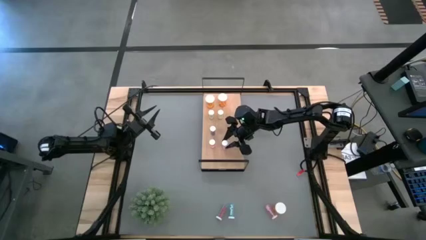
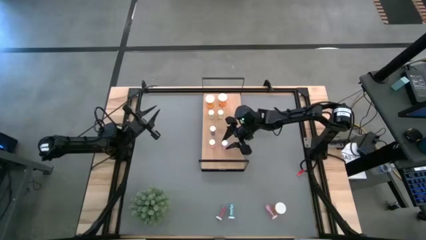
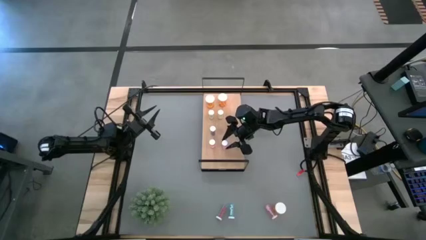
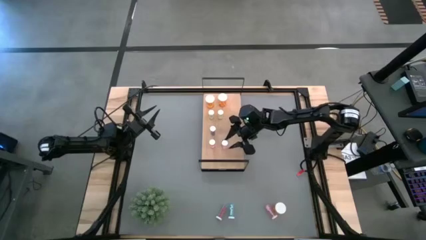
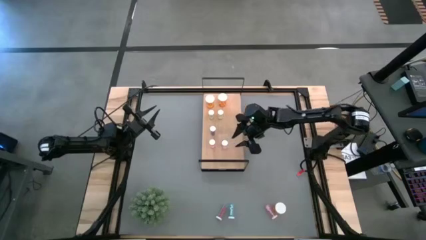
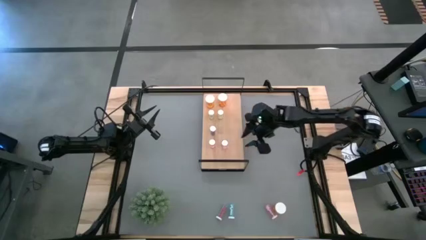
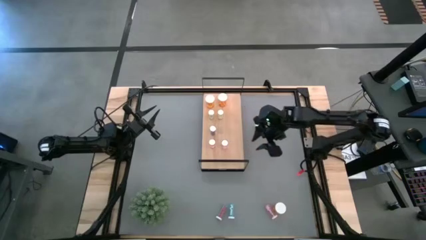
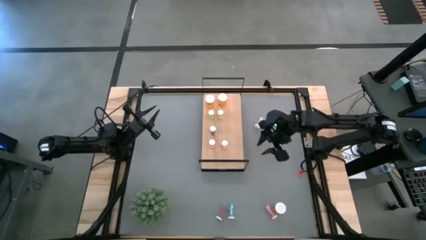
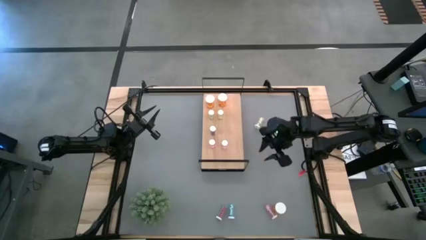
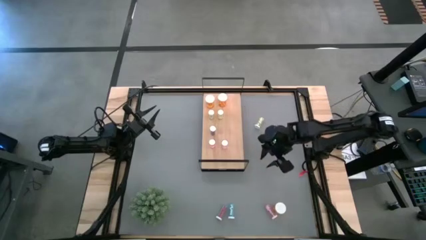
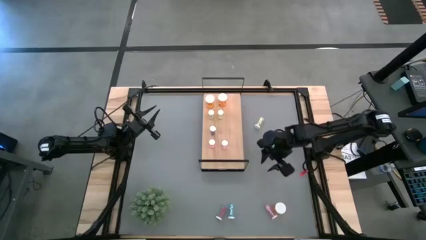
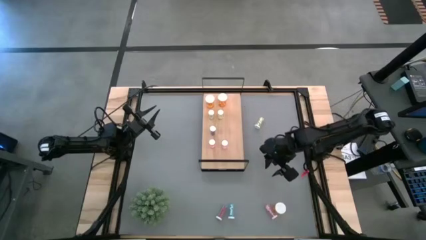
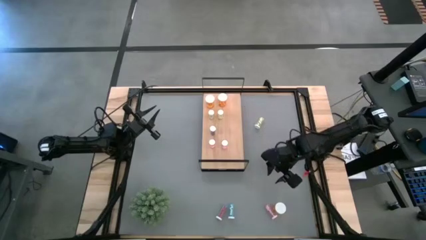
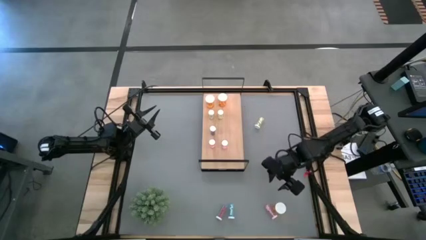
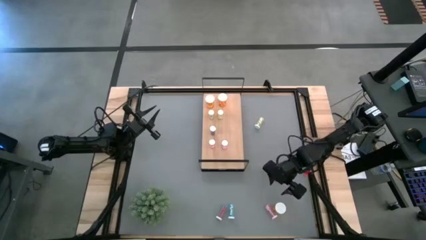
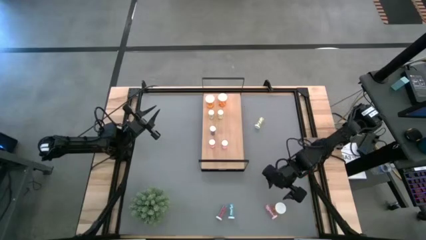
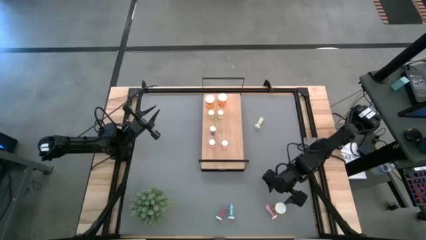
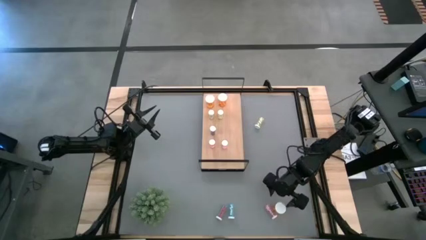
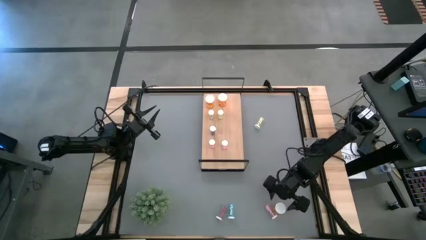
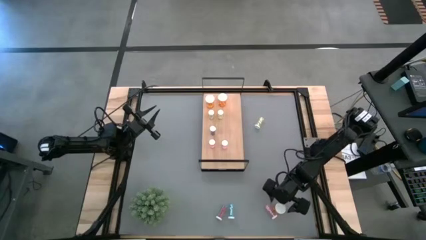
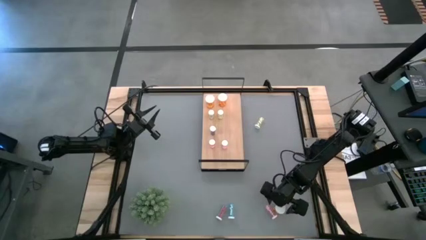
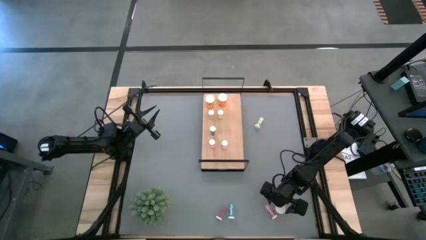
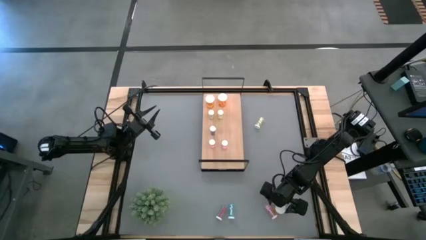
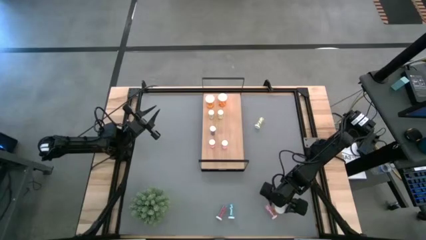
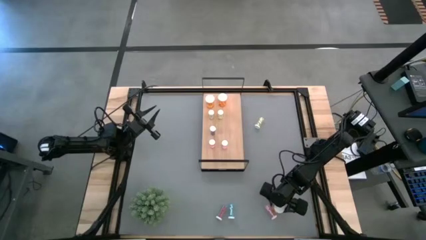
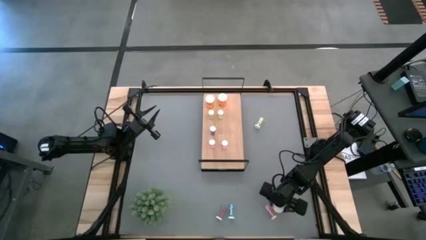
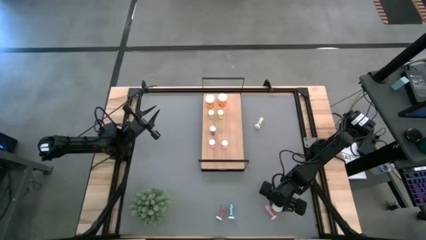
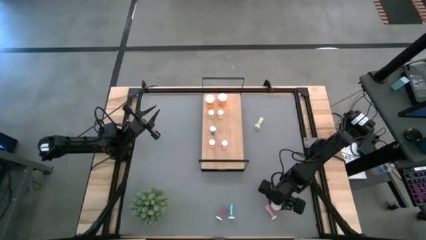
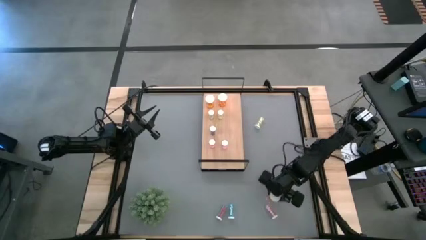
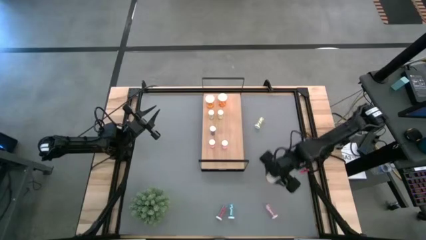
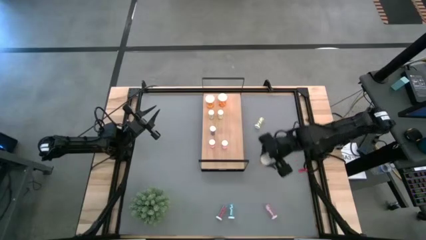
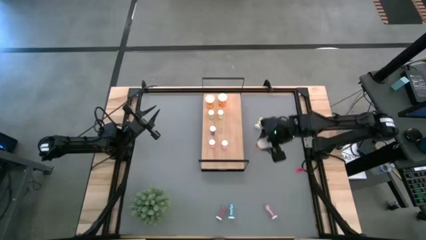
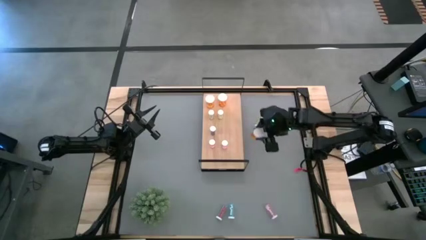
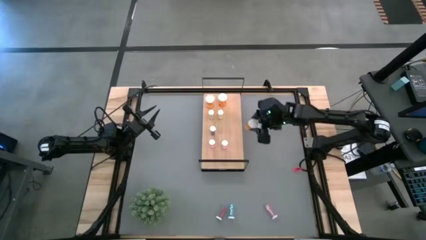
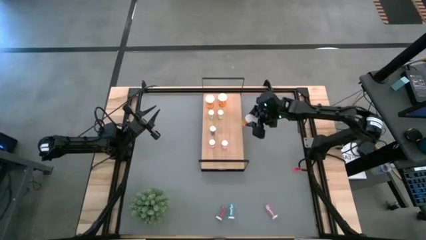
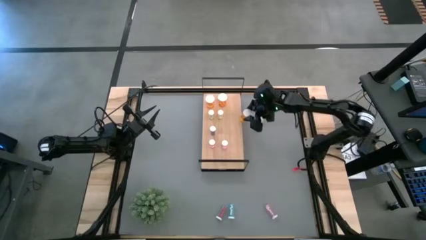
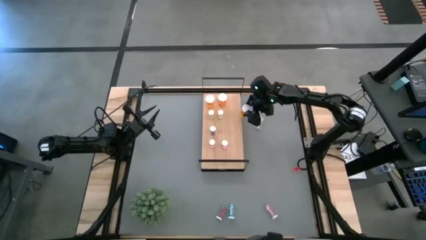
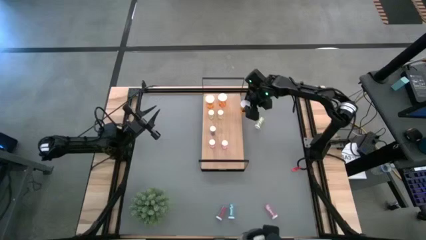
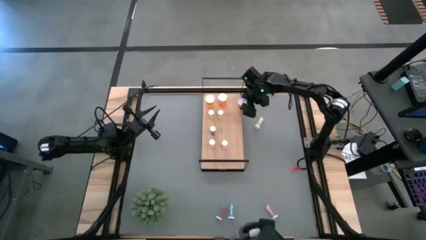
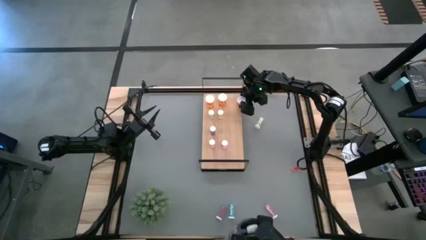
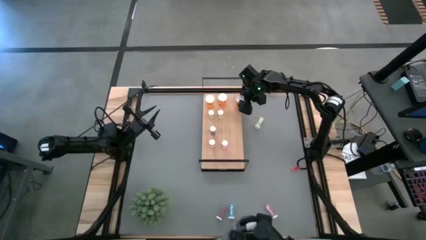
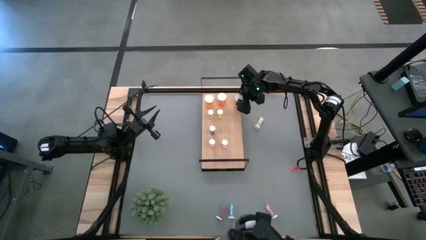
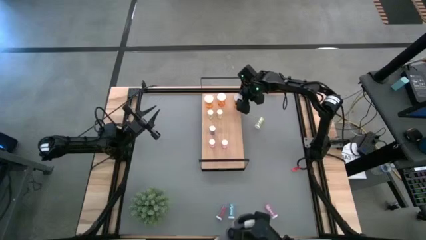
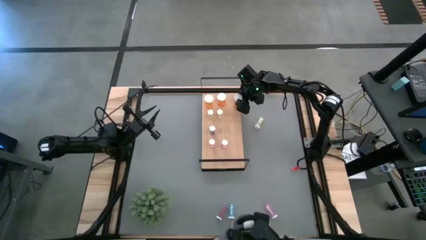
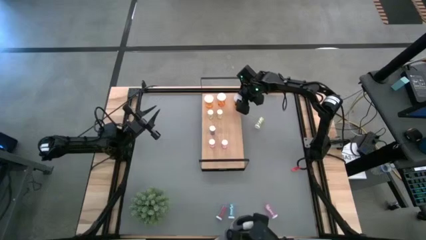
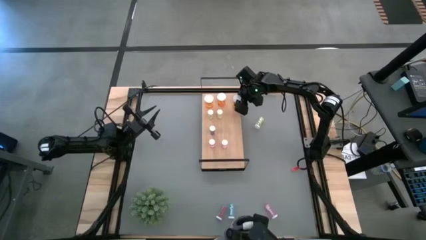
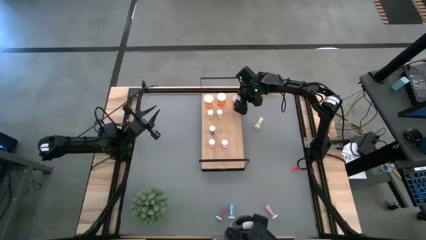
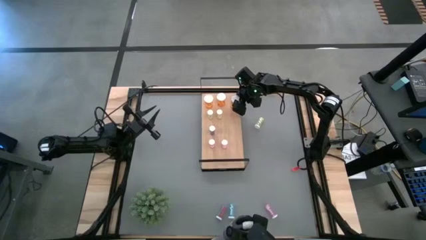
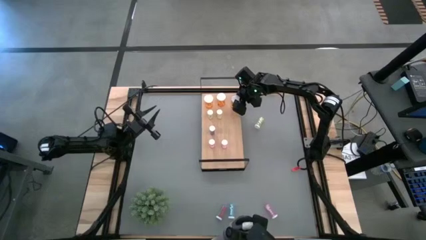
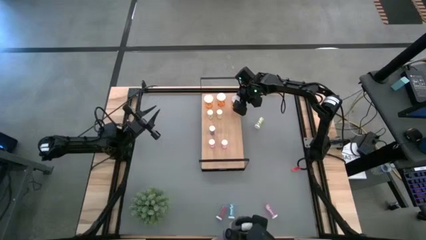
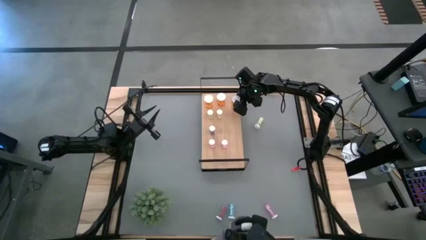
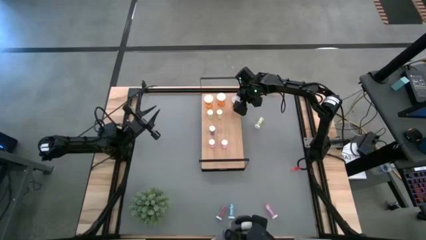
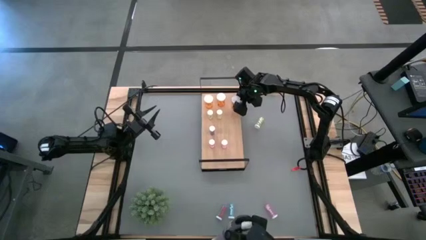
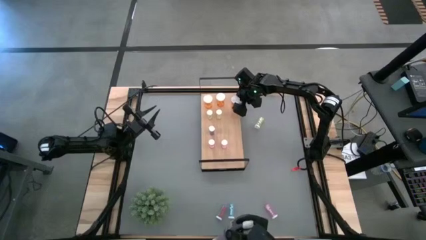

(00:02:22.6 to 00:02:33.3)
Task: Pick and place medicine bottles onto shelf by color
Put the orange pill bottle on the shelf aligned with the other orange pill bottles

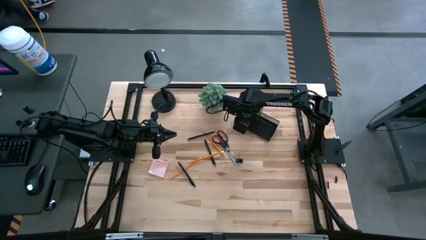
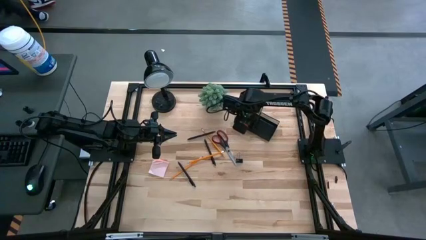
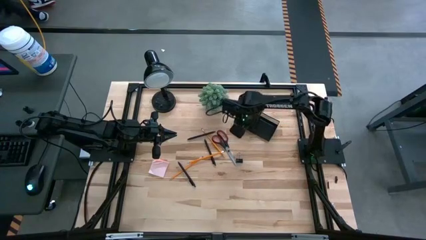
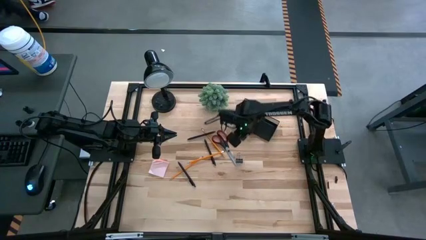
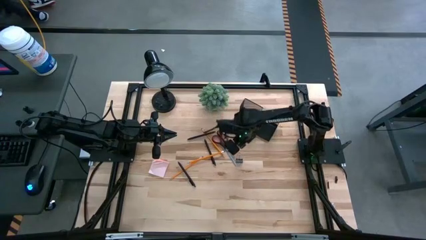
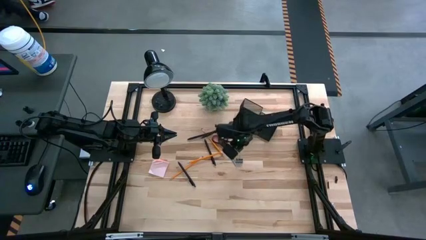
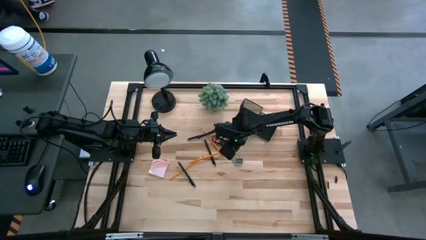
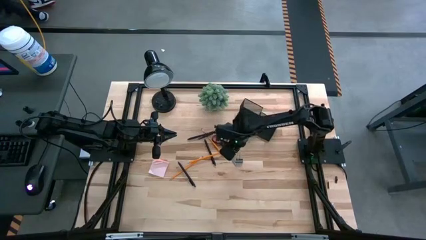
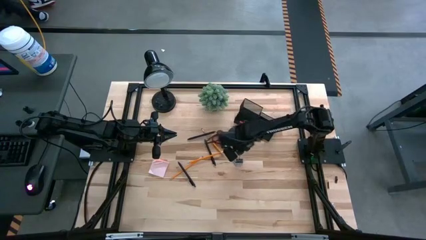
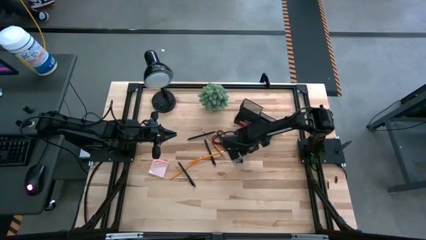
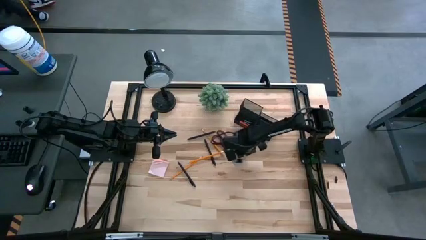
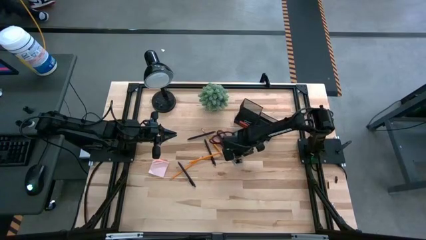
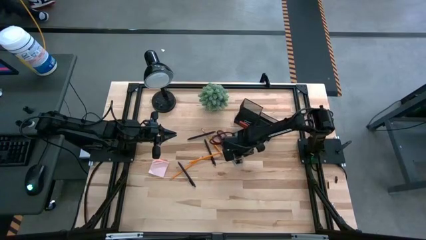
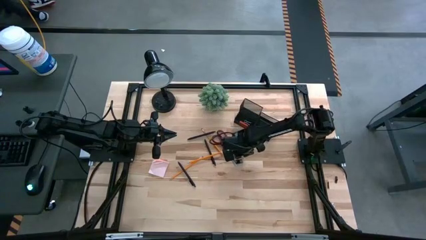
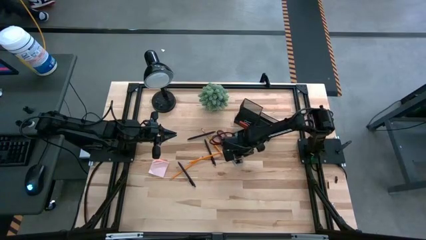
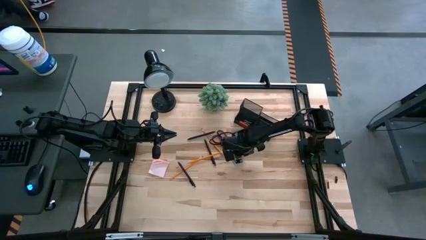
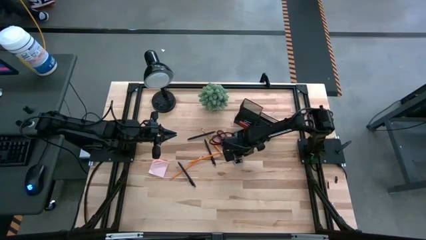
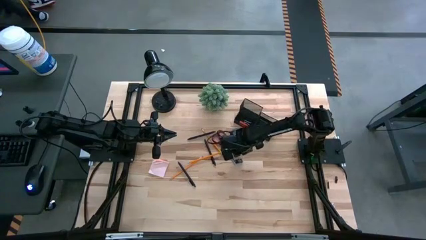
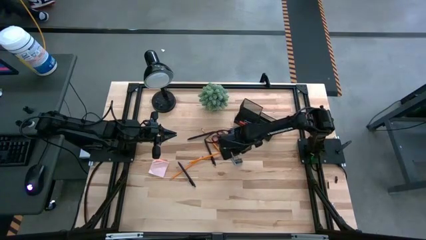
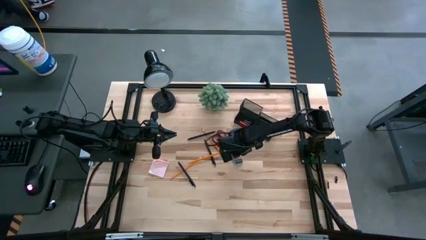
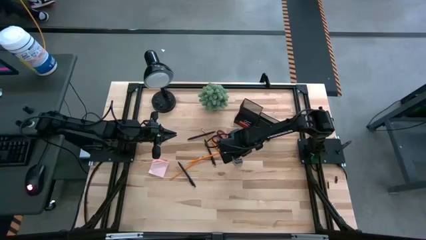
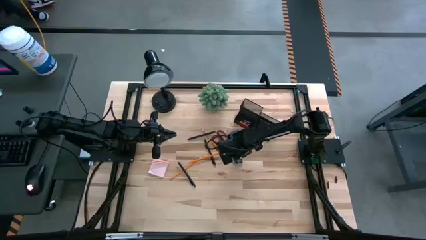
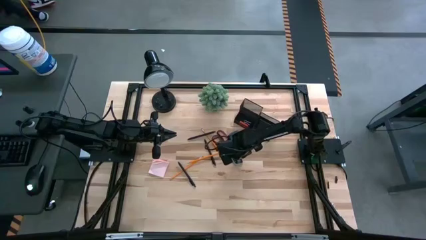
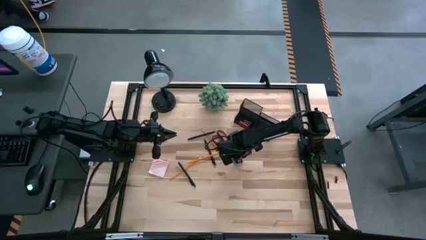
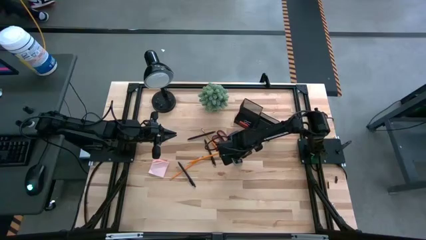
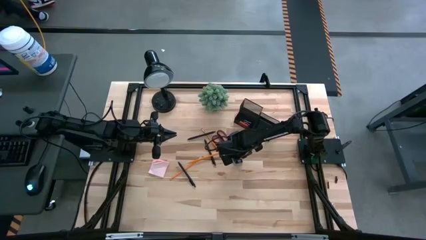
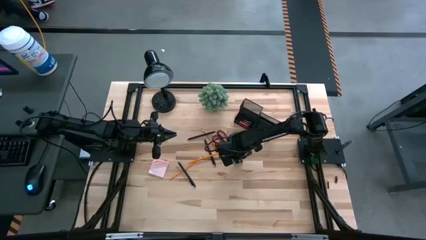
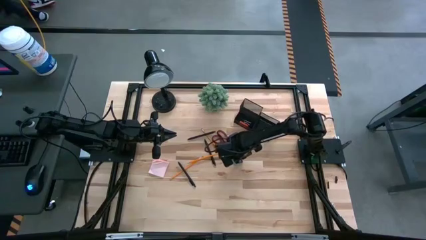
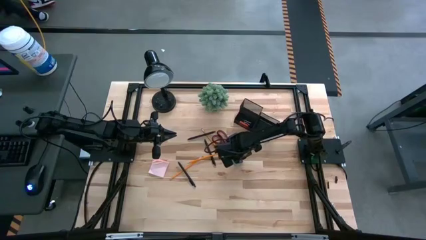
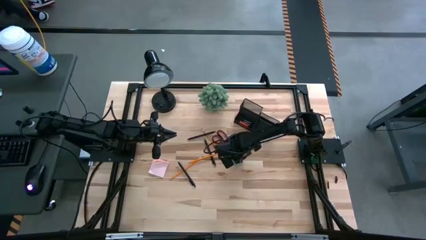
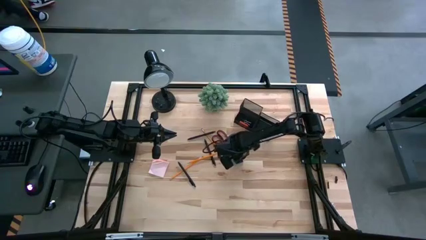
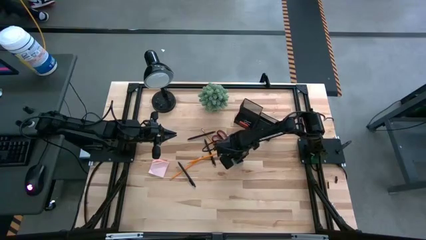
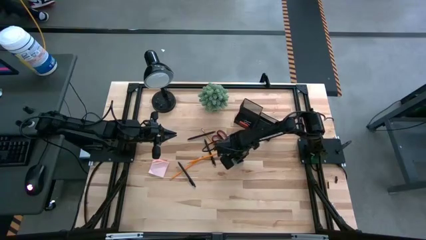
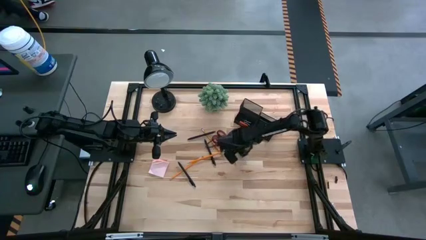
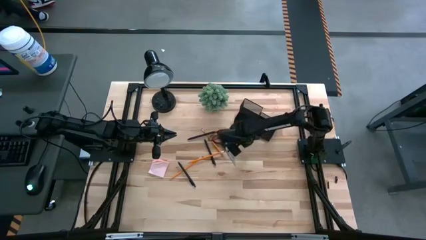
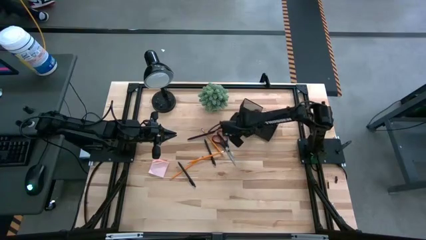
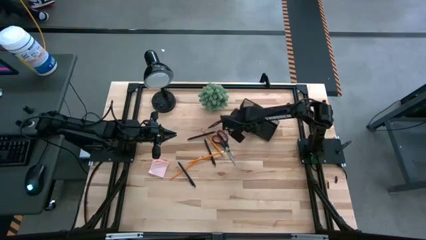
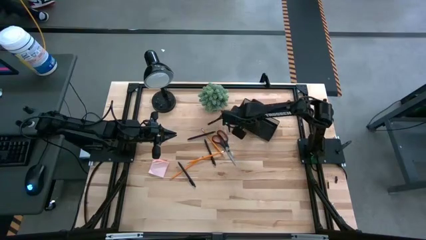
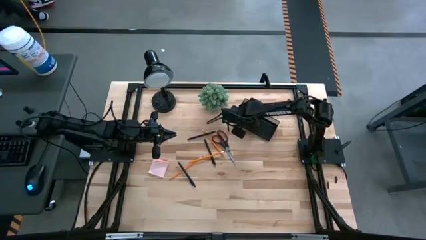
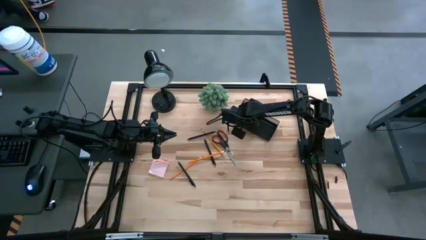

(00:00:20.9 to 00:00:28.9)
Task: Pick and place office supplies into organizer
Put the black binder clip into the black desk organizer
